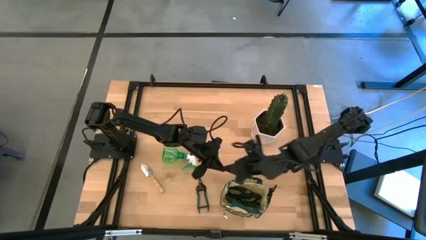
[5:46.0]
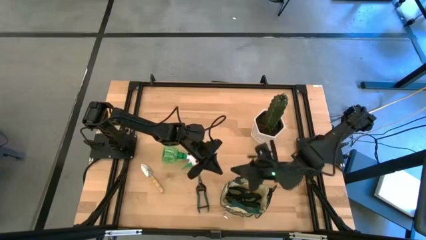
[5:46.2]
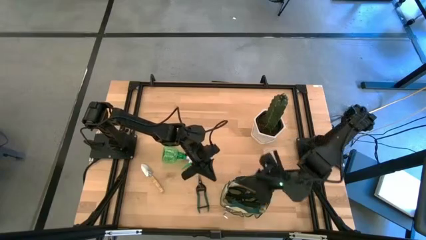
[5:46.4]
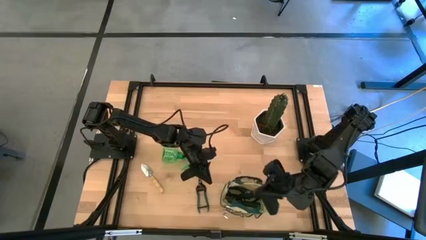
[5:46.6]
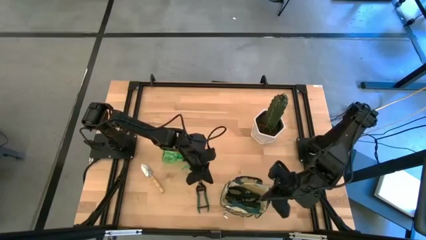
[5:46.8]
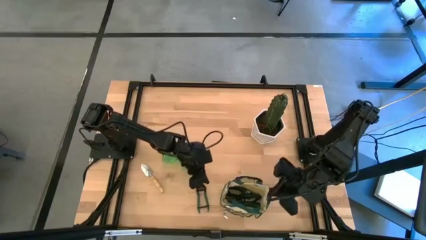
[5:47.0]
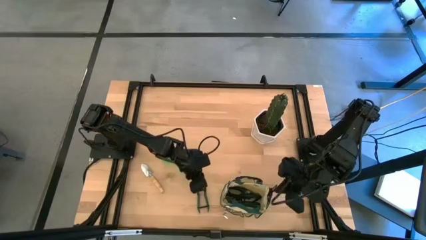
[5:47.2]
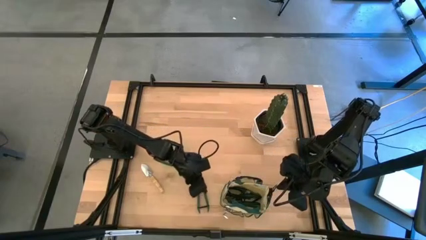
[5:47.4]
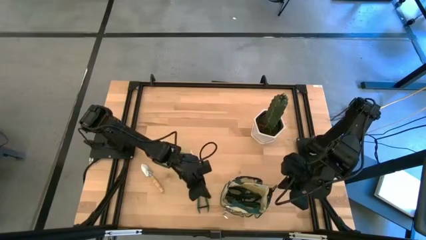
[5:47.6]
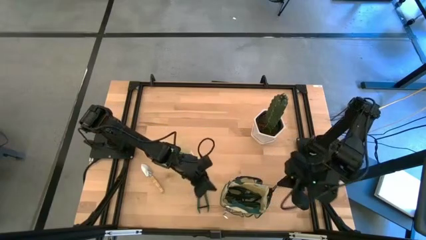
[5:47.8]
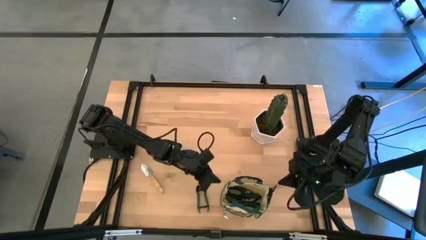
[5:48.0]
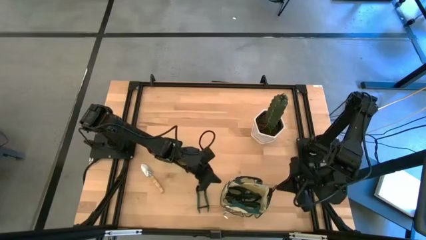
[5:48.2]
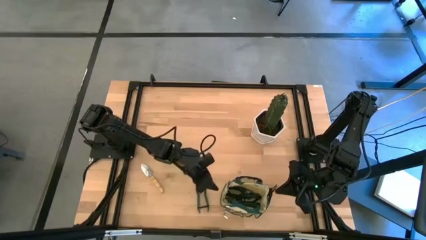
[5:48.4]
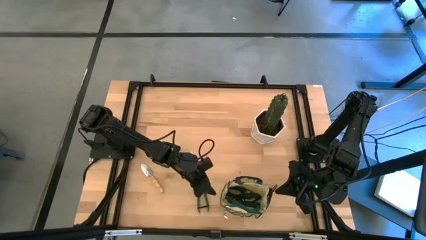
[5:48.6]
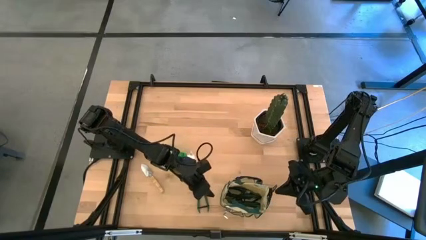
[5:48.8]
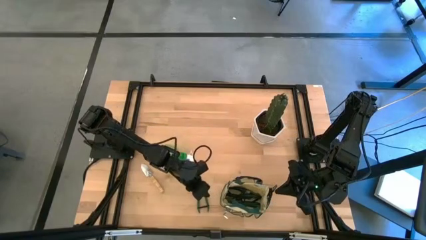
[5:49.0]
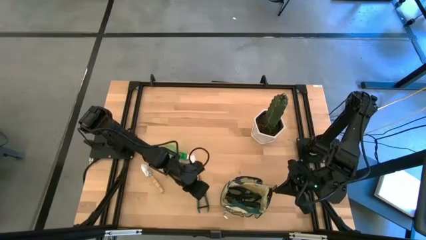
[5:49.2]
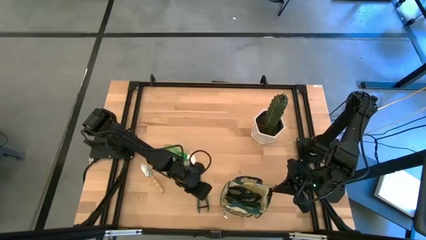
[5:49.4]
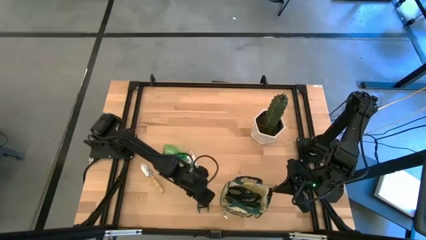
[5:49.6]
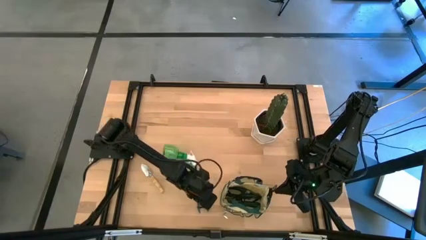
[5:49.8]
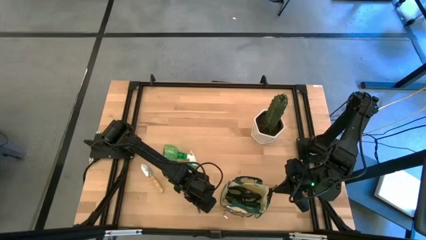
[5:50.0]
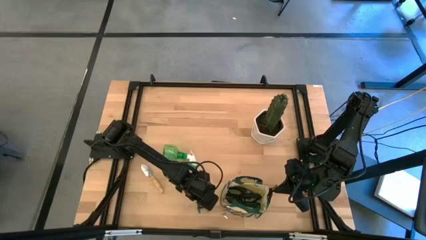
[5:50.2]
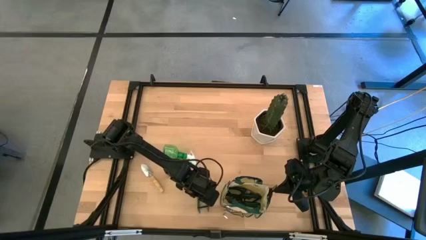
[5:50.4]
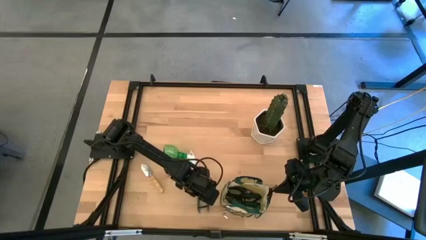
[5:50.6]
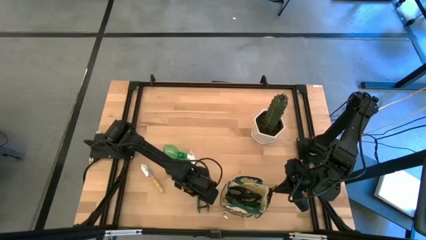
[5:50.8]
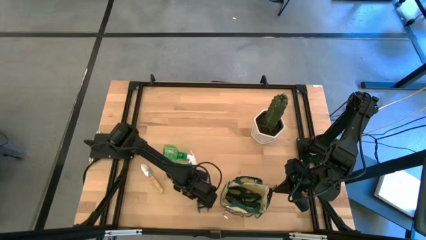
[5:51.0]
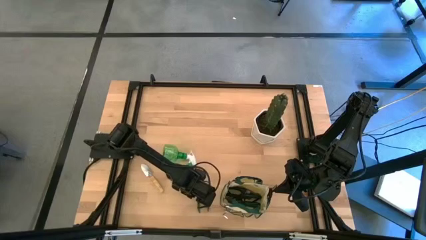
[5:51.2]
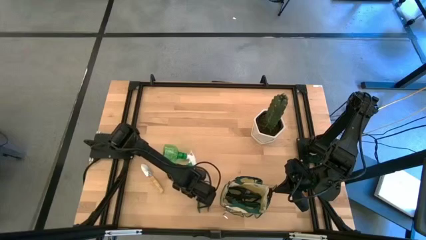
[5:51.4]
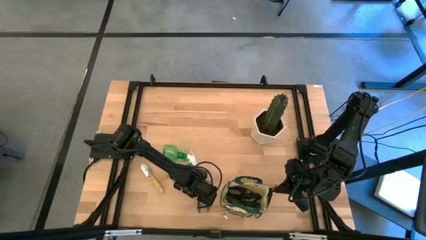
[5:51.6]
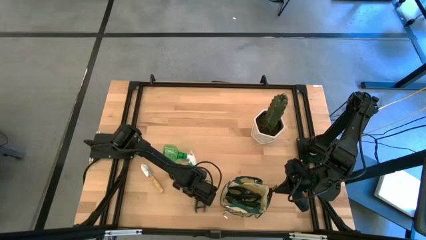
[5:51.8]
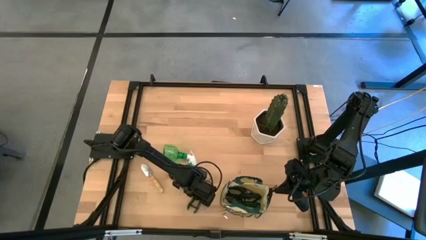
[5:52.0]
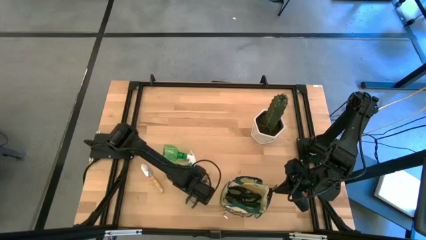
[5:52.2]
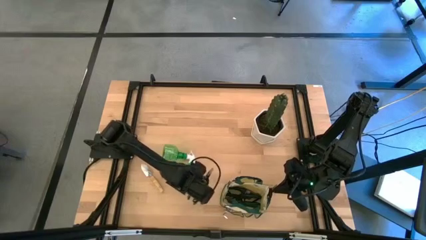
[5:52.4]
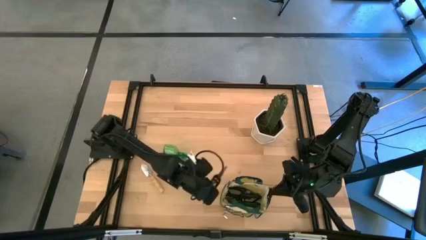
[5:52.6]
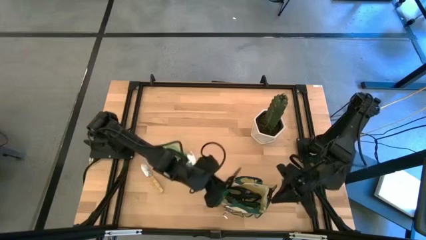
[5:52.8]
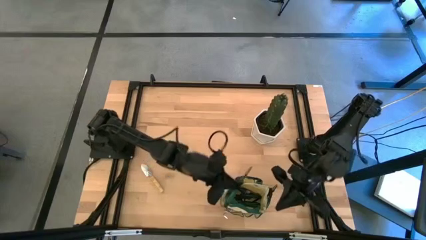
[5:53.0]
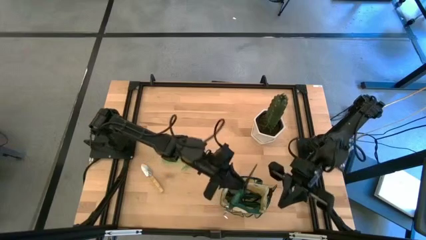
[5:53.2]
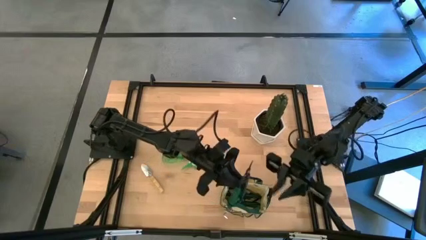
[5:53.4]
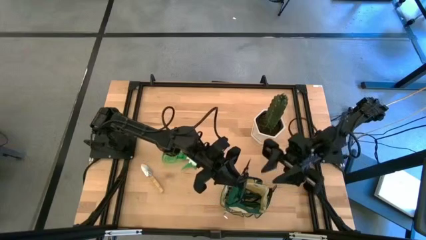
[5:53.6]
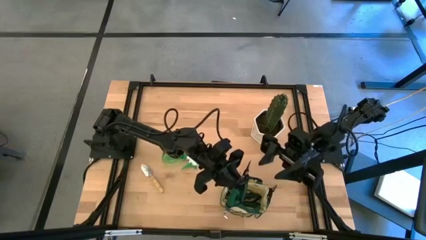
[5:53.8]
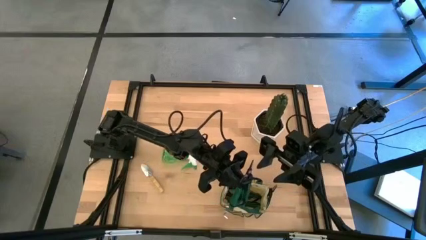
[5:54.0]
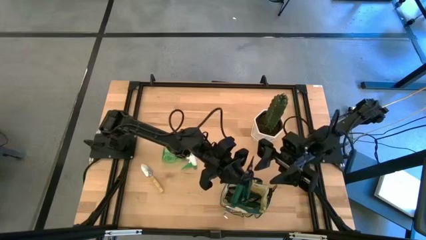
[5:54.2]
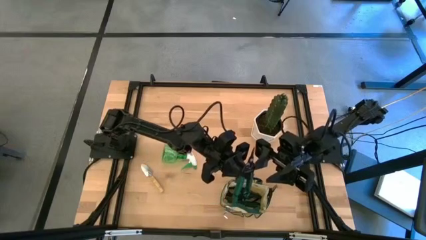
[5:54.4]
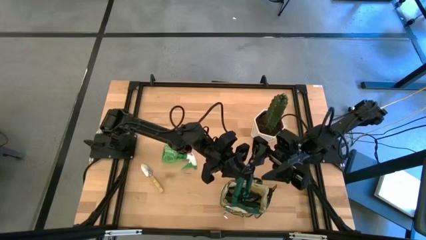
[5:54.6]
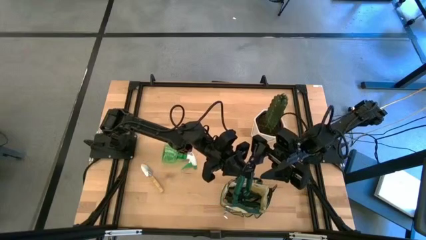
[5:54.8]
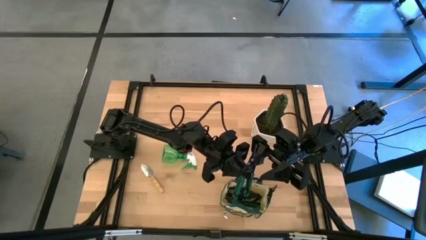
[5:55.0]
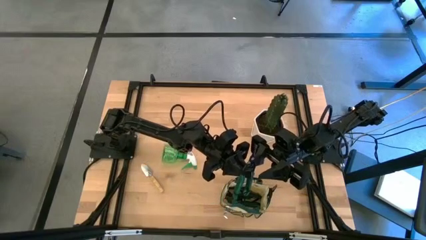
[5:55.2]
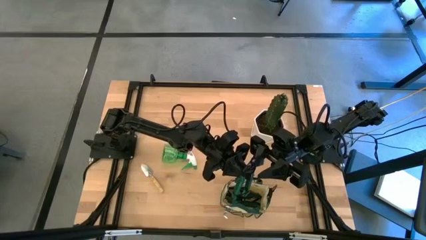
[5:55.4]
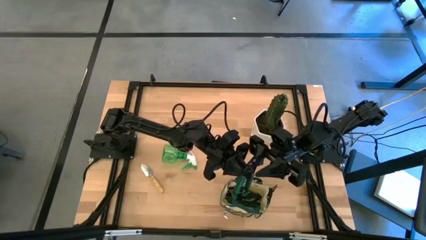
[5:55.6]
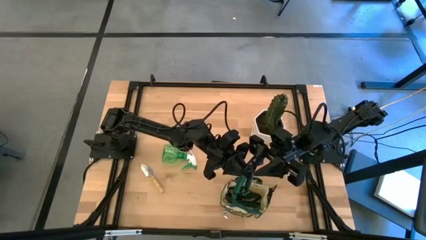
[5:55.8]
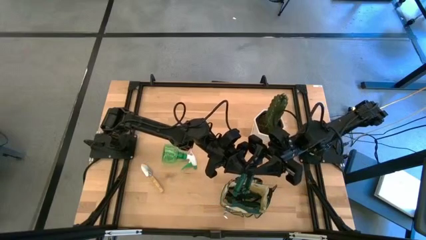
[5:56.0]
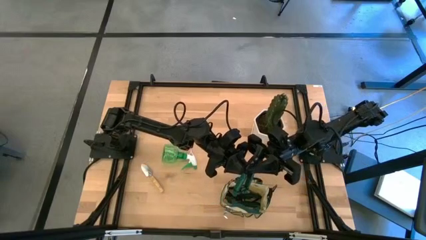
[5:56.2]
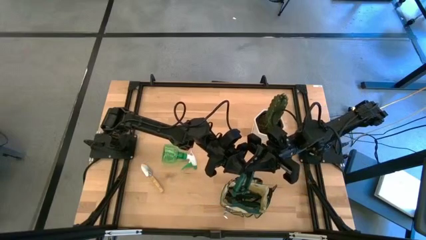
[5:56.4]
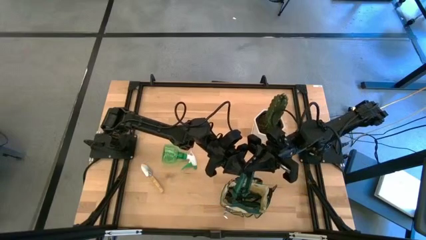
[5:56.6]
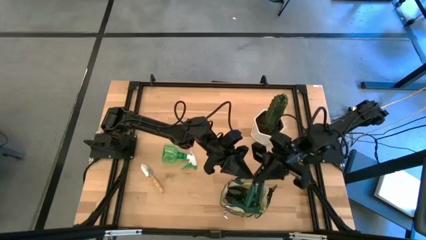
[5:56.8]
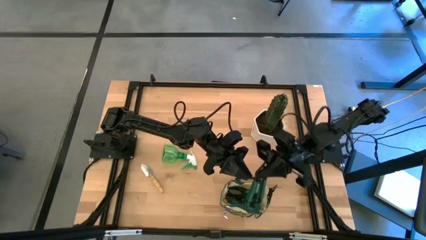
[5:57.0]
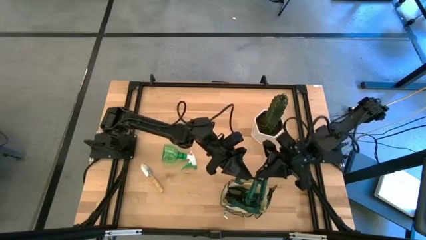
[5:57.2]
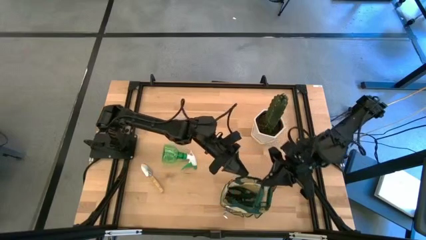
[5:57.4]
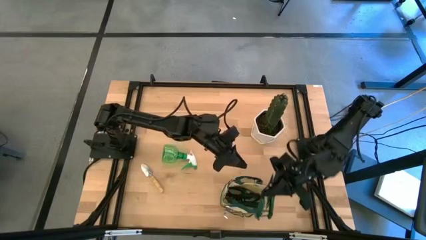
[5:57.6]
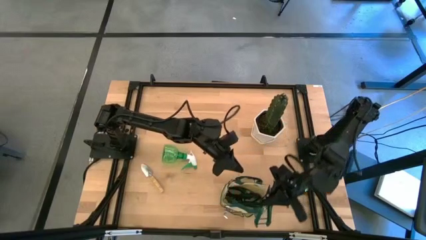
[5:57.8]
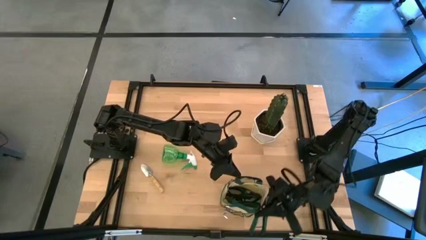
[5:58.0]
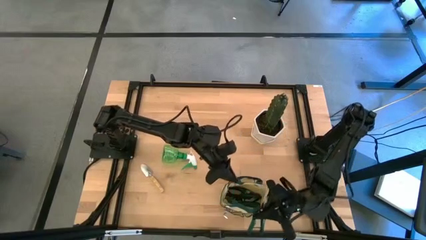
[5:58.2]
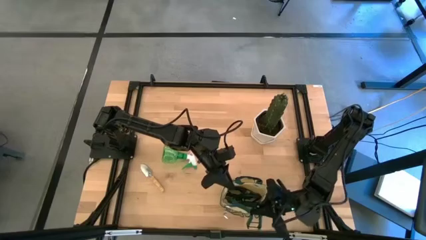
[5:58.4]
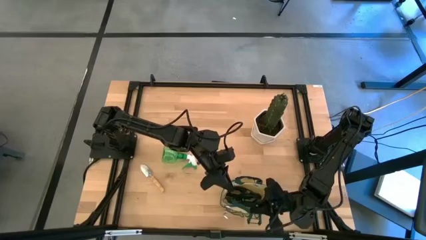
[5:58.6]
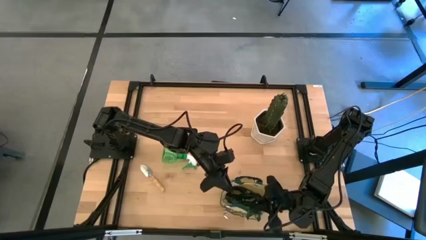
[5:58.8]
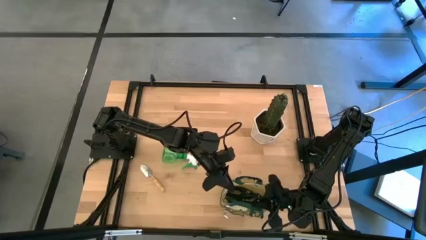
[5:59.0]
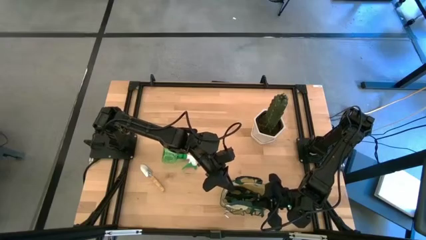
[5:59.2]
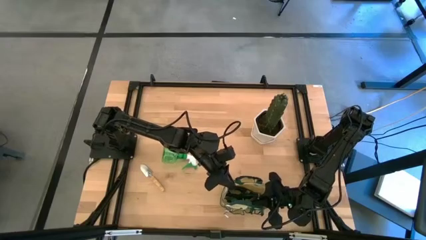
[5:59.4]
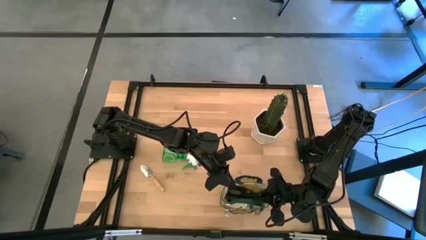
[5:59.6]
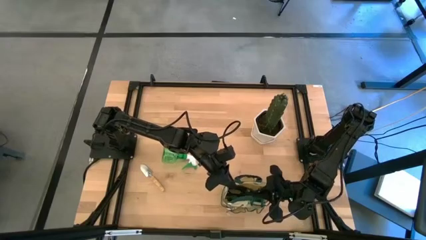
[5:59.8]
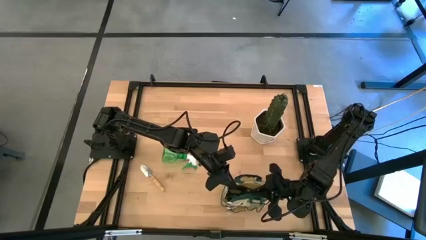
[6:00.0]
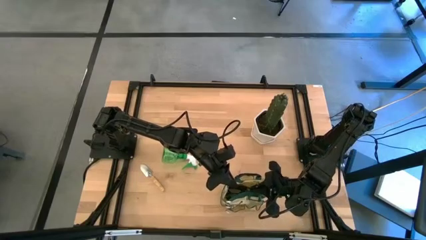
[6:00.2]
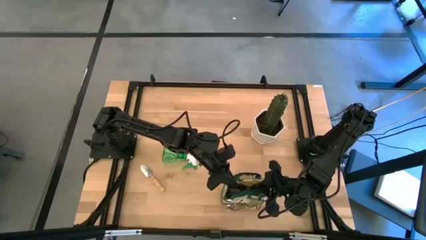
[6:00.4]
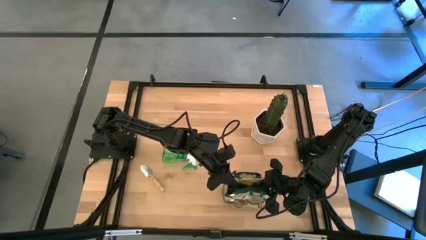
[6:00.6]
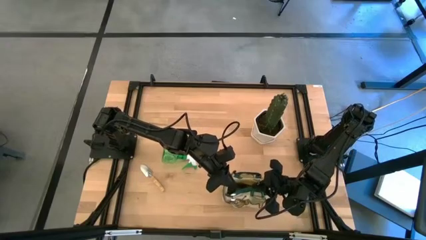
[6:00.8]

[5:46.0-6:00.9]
Task: Pick & Place Garden tools in Gardening bag
Put the grafting pruner into the side pocket of the white bag
